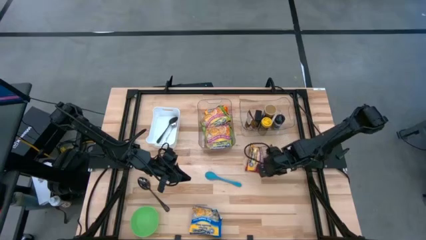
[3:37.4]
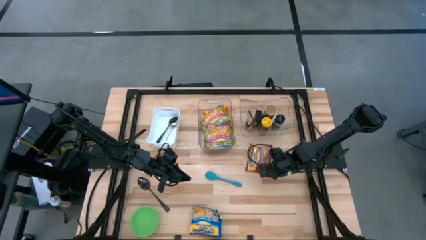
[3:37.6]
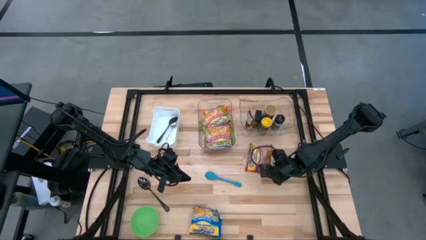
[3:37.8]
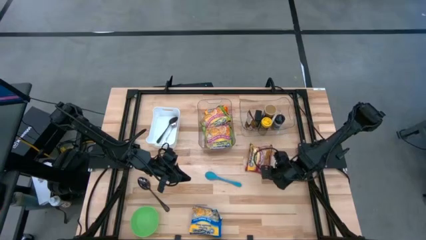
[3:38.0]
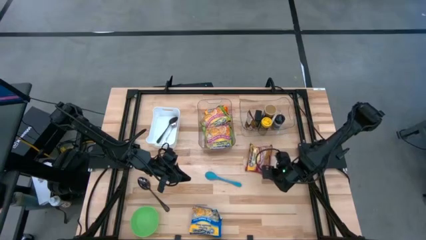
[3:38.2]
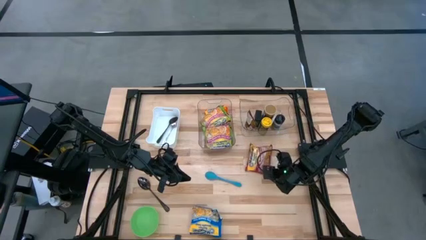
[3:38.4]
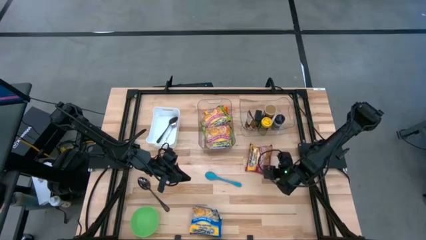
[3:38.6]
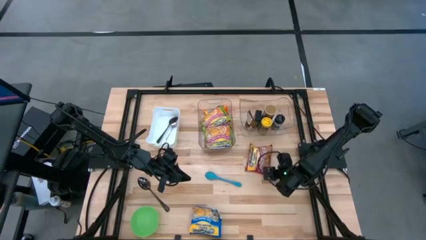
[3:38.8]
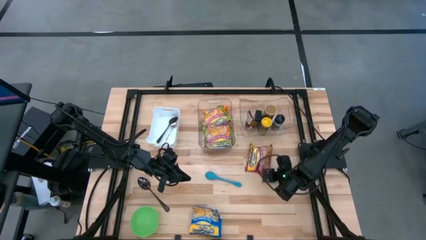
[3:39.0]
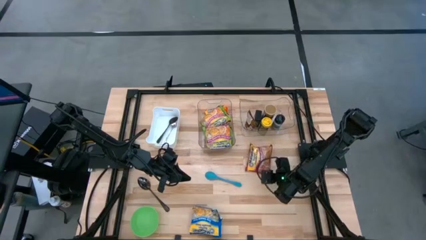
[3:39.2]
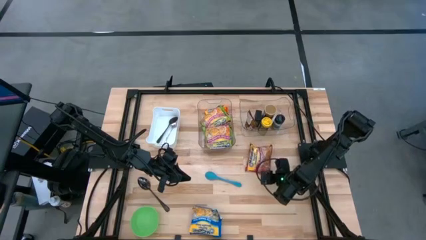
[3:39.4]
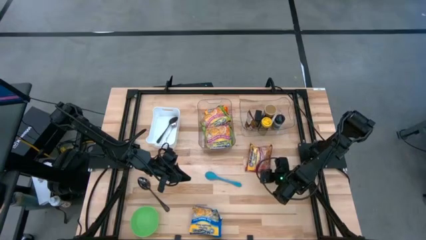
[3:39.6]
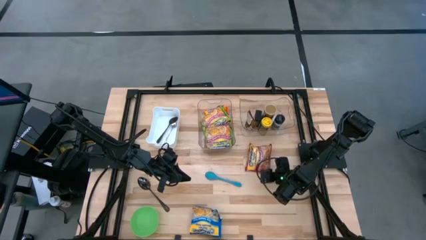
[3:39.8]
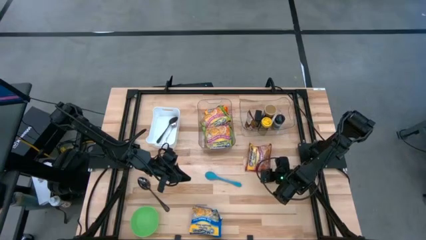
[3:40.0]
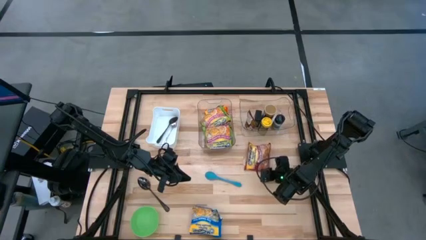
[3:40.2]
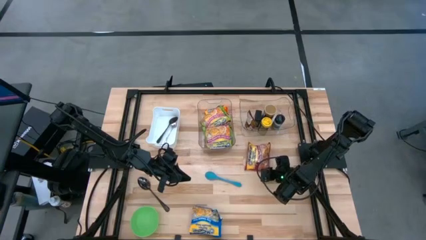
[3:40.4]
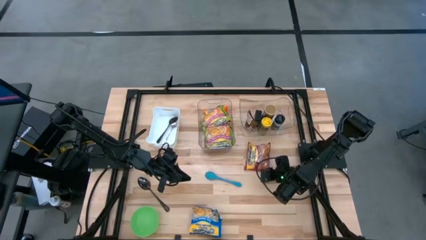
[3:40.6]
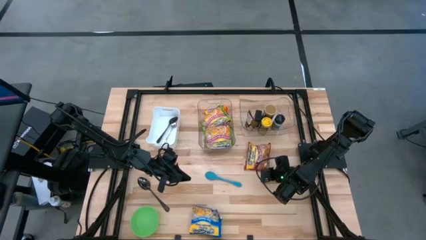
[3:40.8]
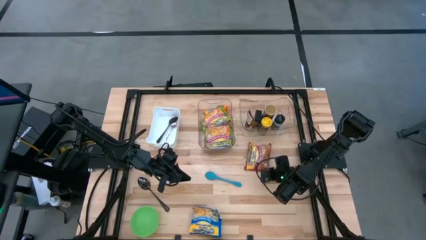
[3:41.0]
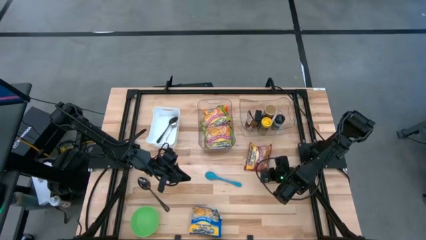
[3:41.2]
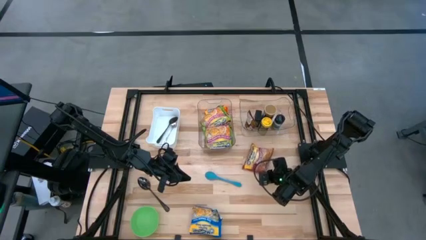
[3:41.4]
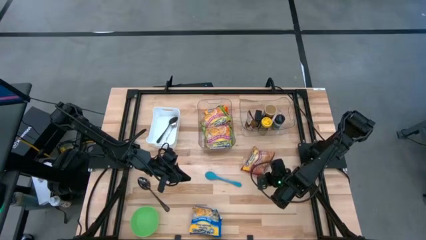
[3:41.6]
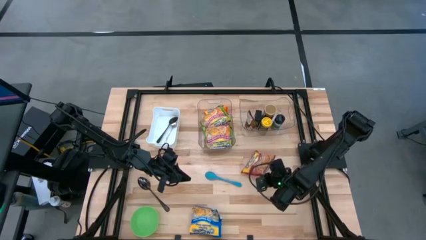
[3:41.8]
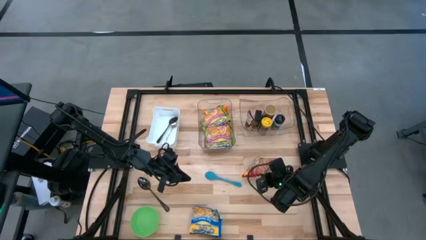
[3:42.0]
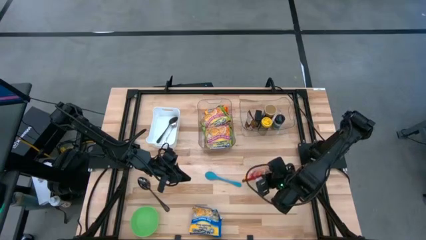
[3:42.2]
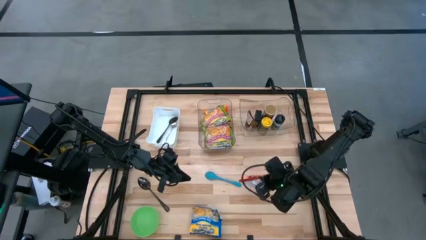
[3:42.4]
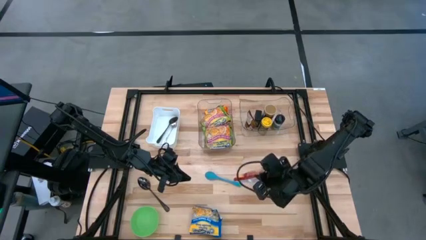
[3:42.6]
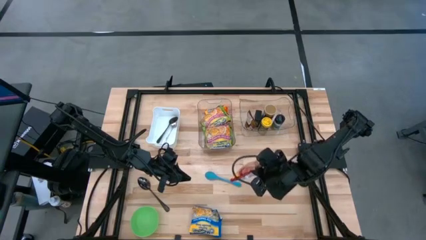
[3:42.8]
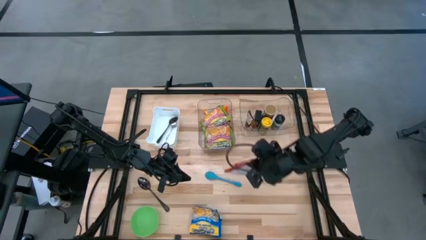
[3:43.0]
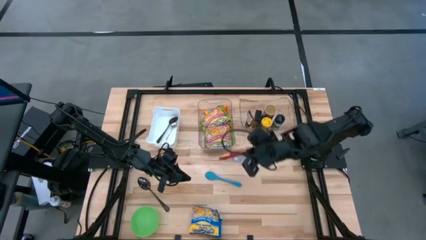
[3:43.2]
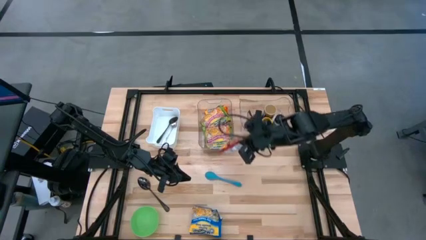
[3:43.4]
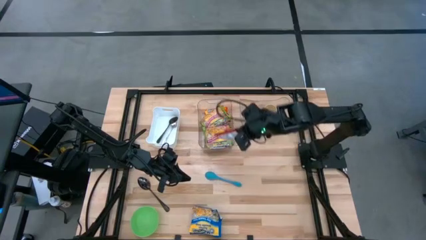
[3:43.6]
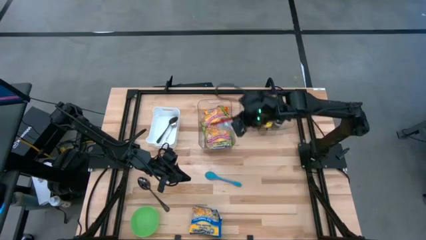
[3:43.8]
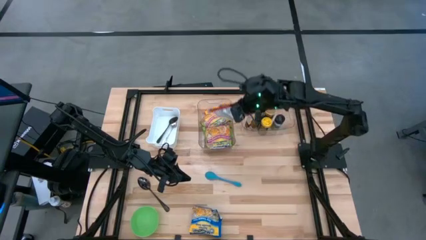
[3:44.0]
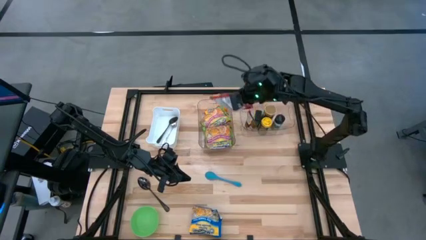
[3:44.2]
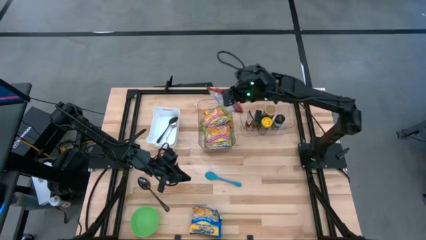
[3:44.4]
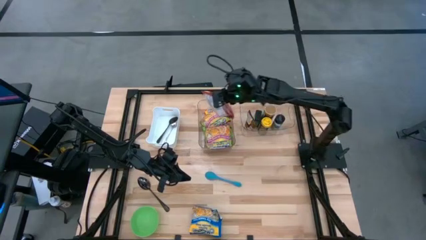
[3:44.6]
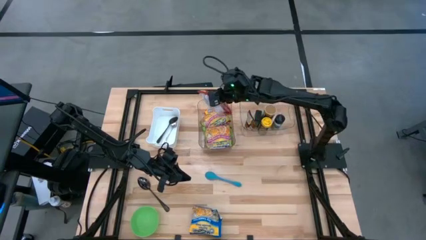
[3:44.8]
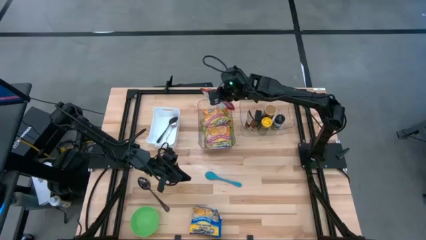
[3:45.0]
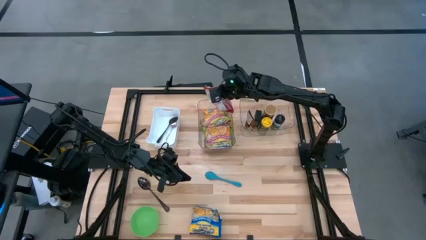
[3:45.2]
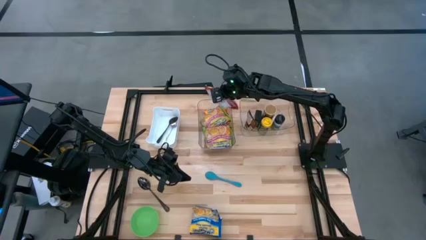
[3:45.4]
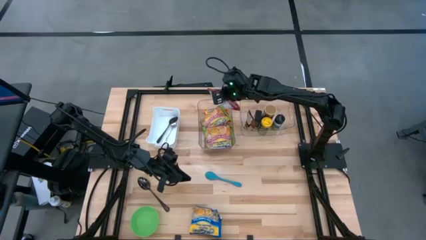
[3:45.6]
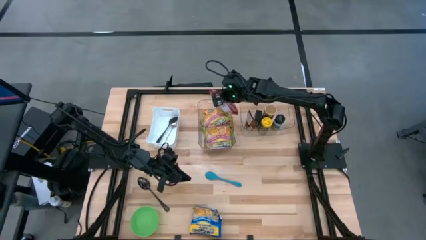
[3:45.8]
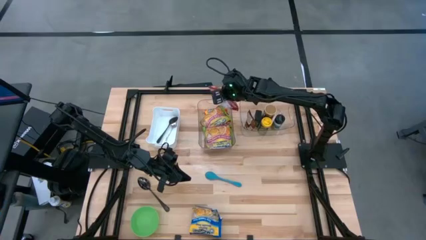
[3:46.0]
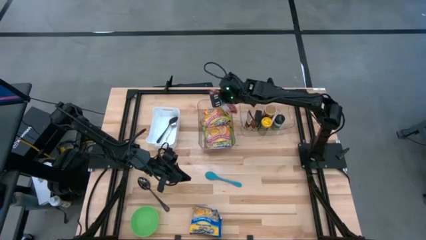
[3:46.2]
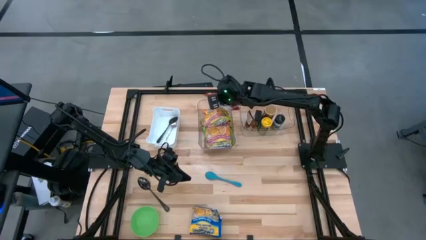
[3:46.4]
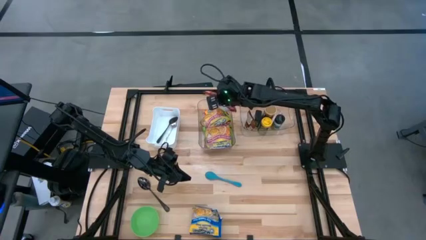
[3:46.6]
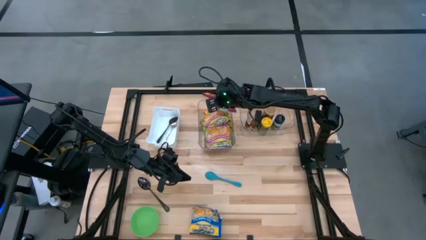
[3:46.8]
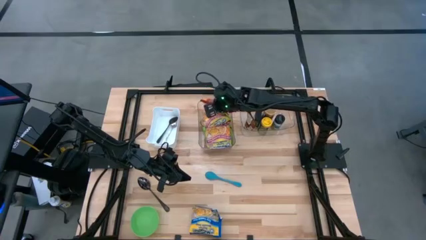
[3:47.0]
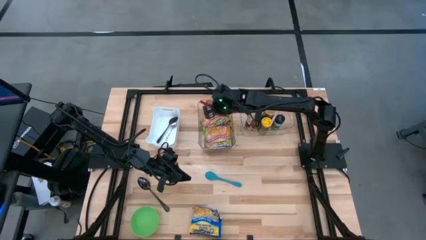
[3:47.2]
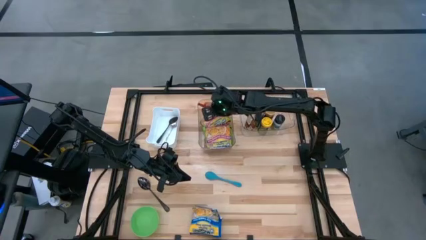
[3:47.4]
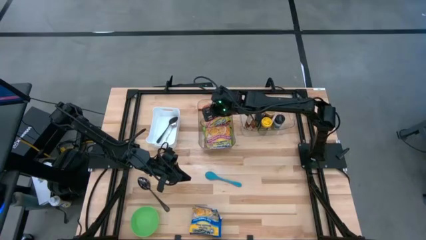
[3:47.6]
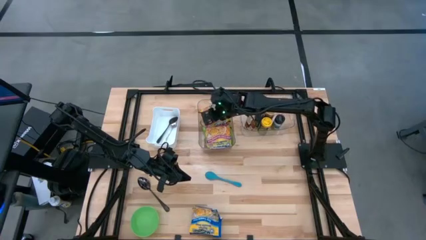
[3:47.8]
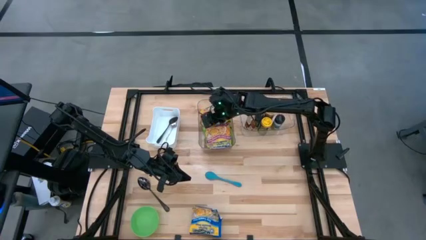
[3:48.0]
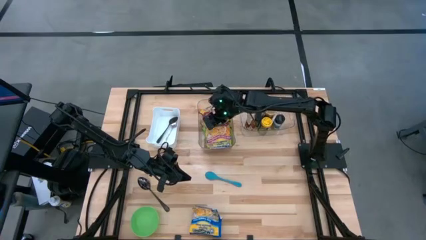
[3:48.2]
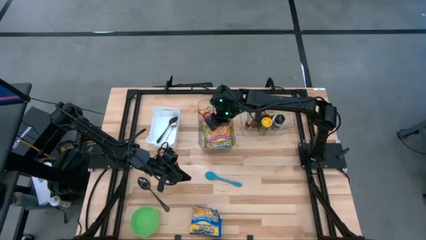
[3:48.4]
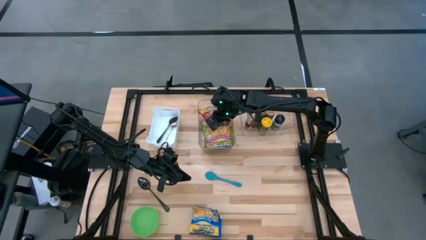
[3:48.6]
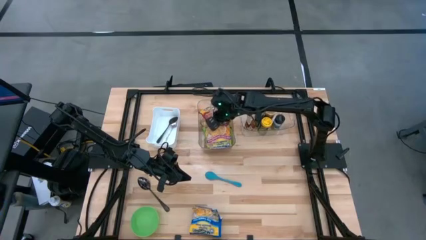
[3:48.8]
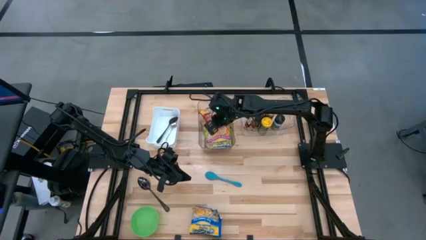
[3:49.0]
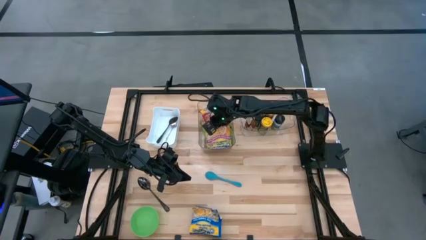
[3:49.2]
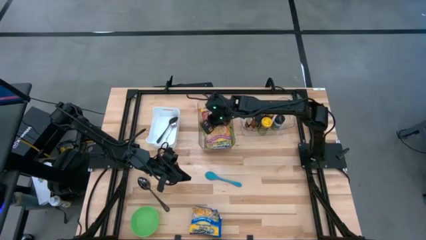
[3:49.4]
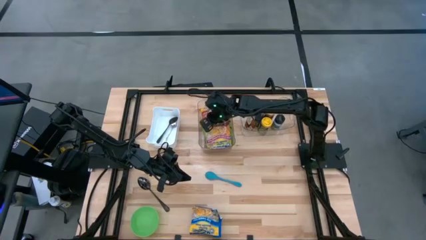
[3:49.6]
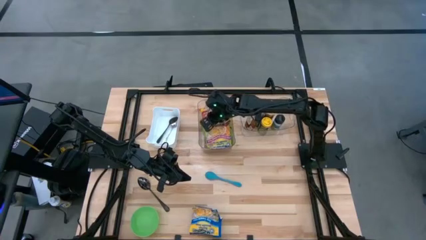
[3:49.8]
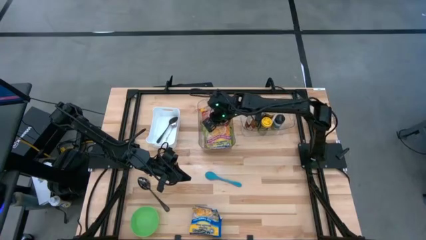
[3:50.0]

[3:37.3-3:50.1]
Task: Pick & Place Food Item
Put the red noodle pack into the left transparent bin

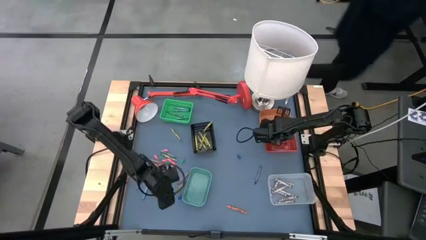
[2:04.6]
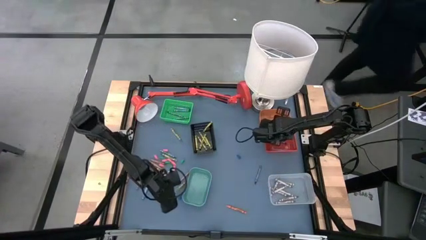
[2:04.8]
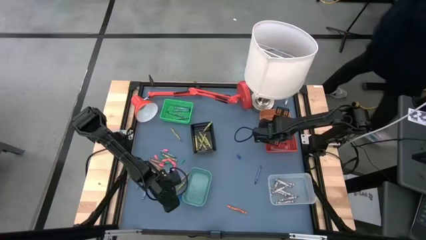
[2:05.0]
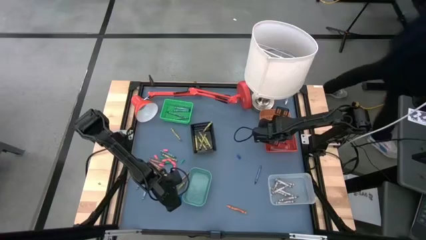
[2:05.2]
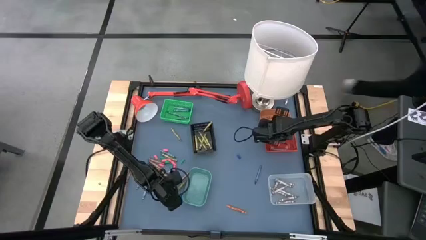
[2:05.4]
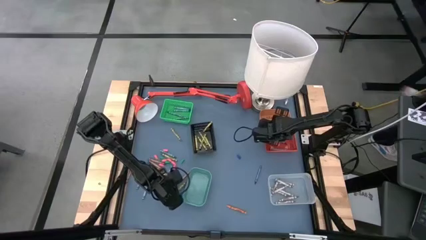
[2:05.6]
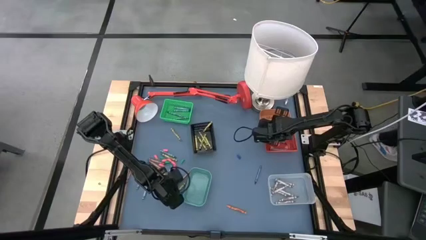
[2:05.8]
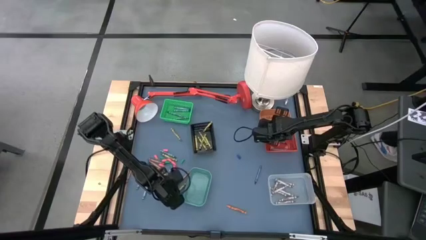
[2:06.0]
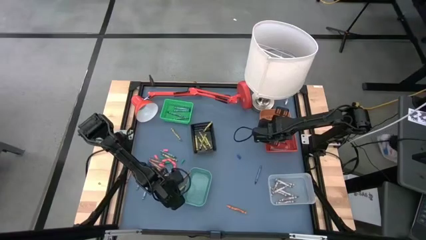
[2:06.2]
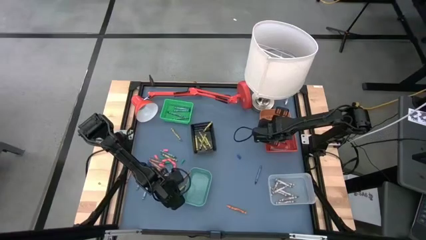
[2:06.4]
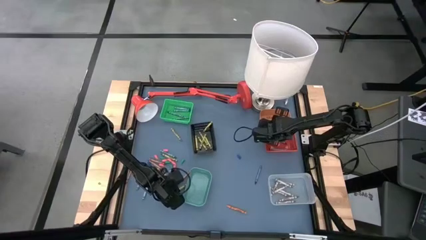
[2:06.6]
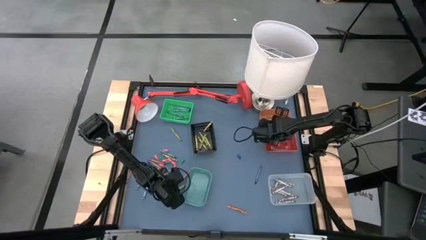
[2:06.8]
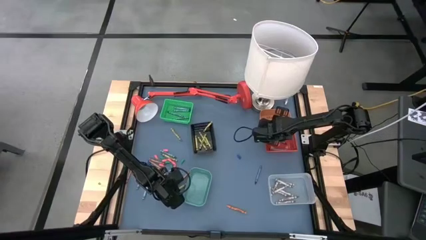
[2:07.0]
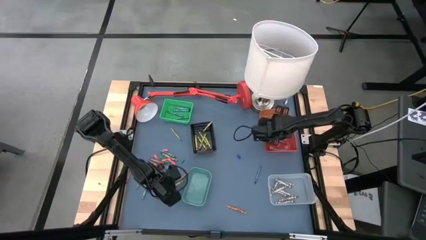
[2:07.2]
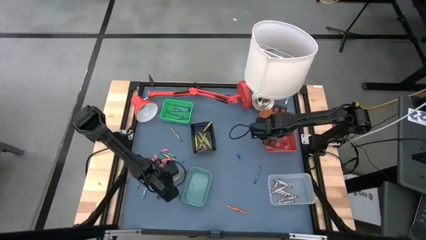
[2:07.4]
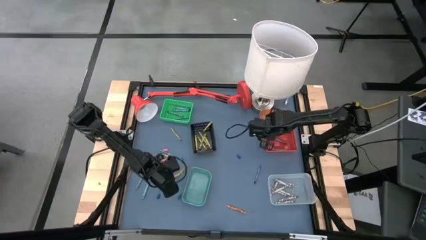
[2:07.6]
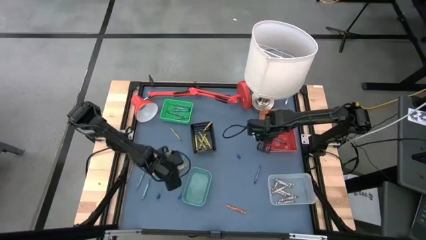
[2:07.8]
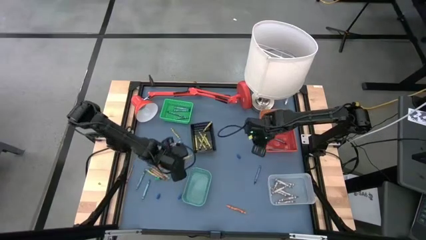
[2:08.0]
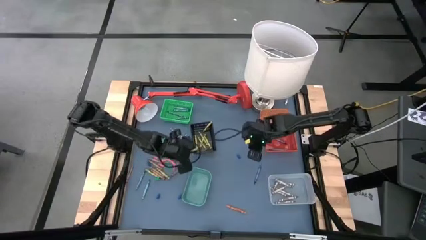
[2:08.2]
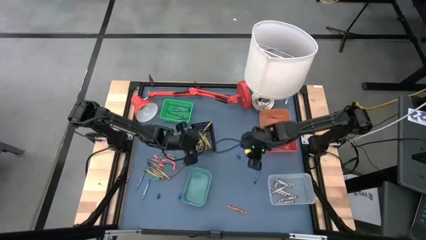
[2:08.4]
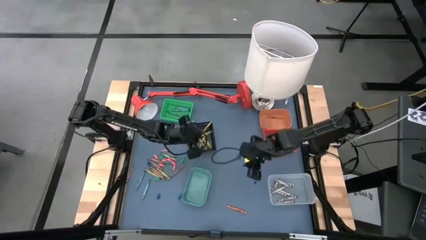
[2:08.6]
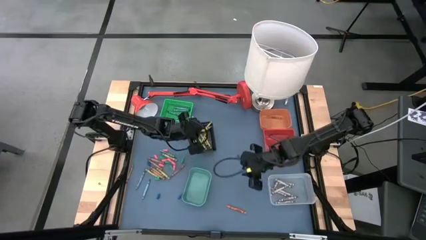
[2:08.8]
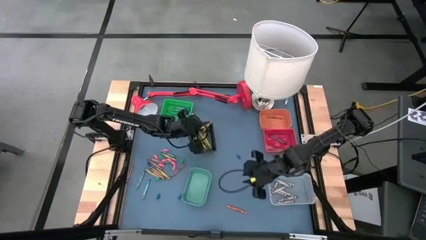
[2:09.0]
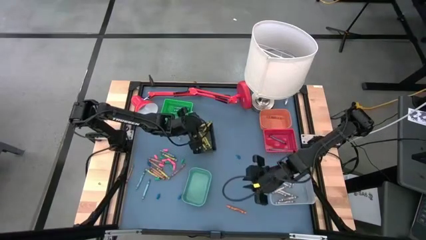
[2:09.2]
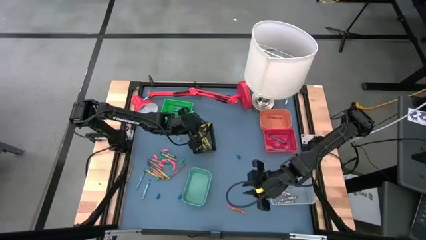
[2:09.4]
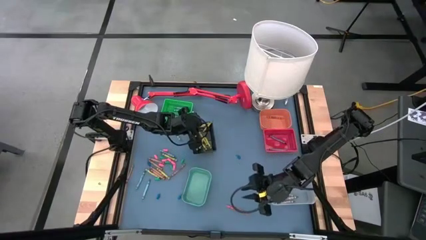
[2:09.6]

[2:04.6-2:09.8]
Task: Sort crayons
Put the green crayon into the black bin
